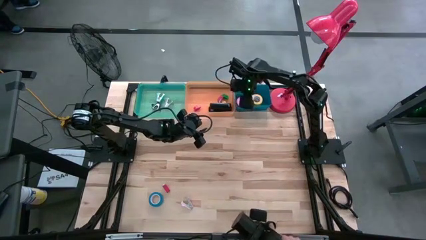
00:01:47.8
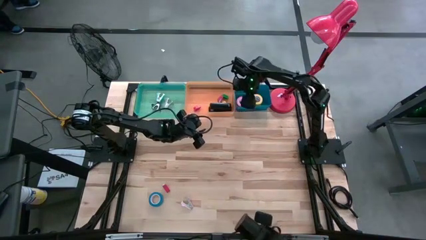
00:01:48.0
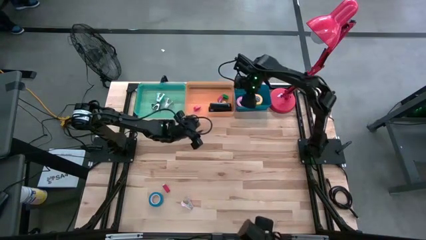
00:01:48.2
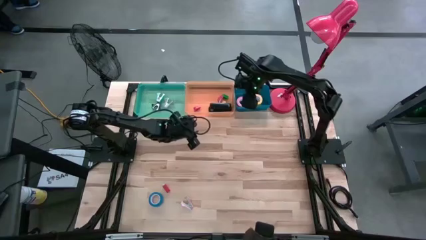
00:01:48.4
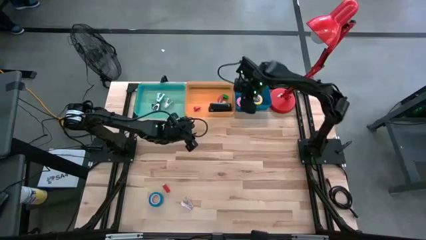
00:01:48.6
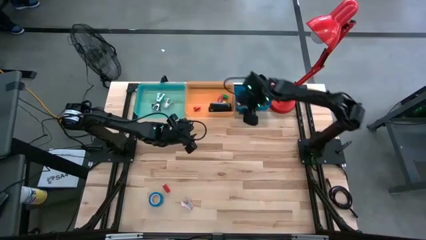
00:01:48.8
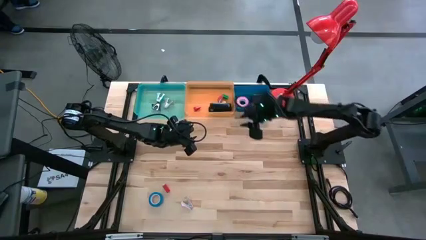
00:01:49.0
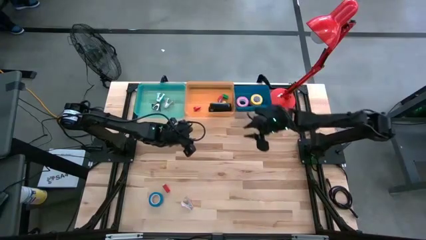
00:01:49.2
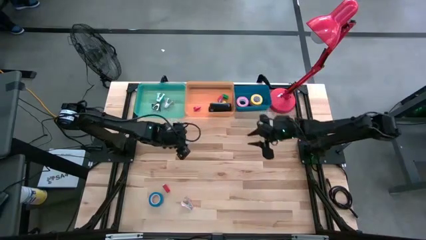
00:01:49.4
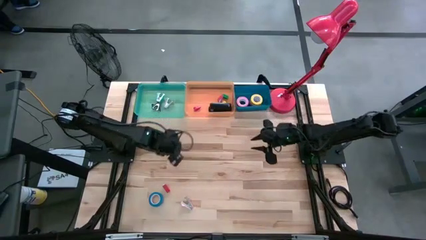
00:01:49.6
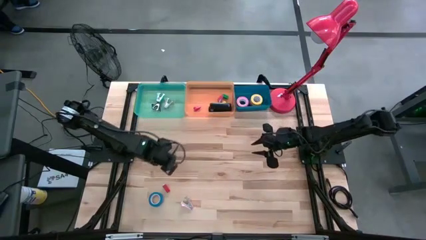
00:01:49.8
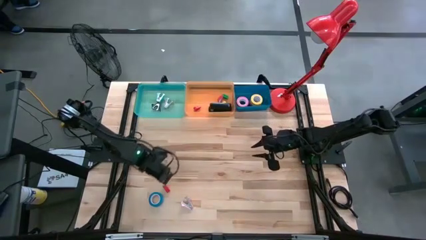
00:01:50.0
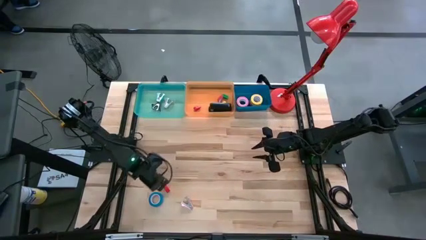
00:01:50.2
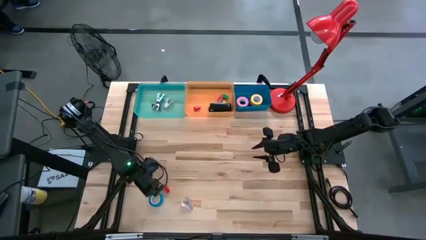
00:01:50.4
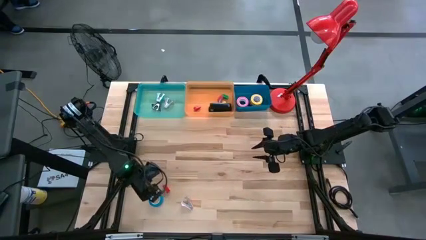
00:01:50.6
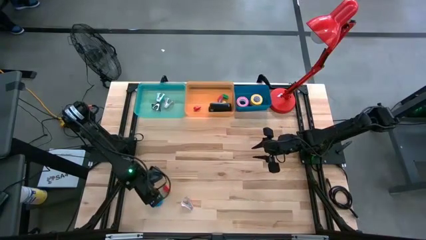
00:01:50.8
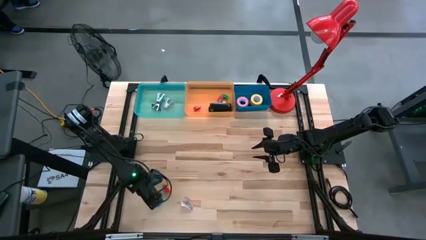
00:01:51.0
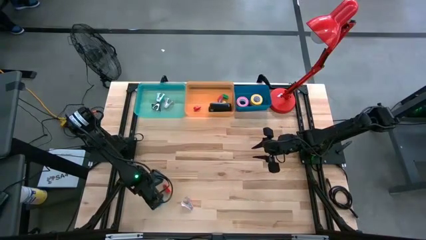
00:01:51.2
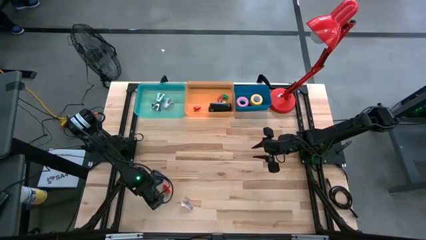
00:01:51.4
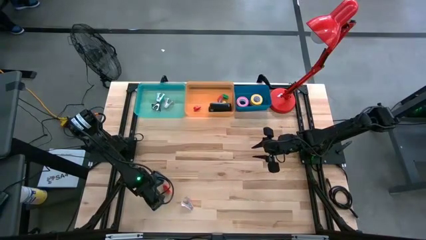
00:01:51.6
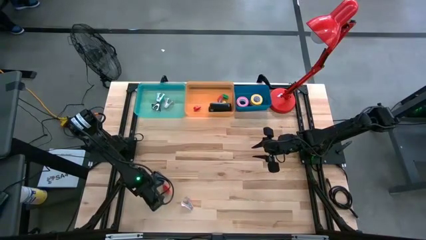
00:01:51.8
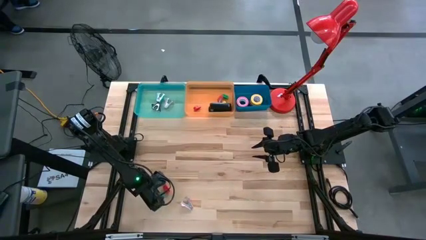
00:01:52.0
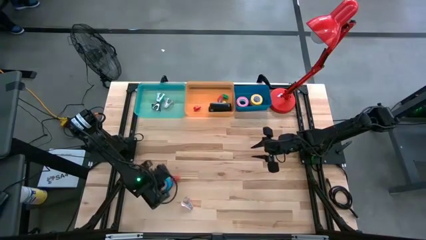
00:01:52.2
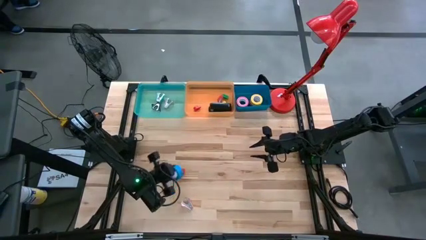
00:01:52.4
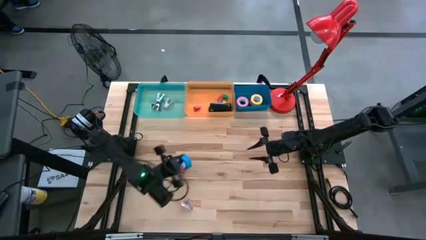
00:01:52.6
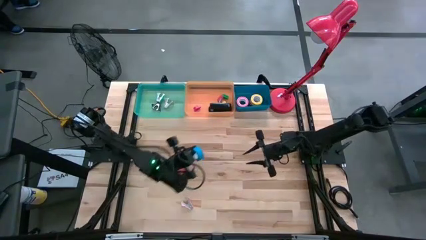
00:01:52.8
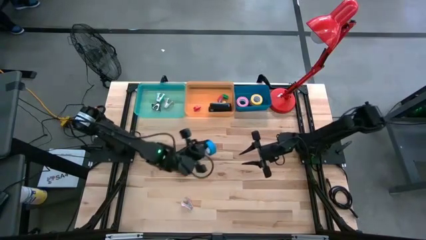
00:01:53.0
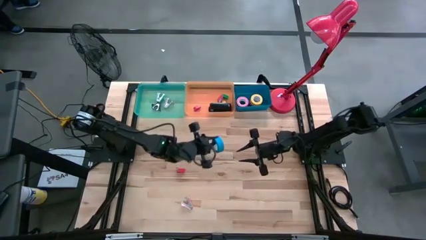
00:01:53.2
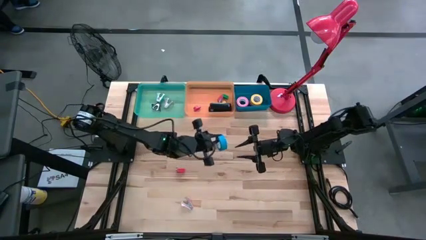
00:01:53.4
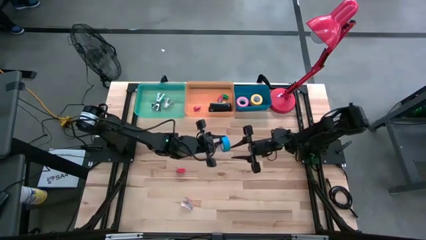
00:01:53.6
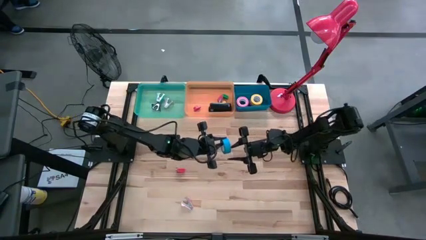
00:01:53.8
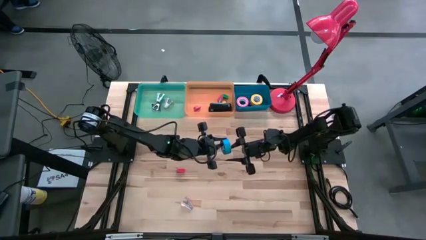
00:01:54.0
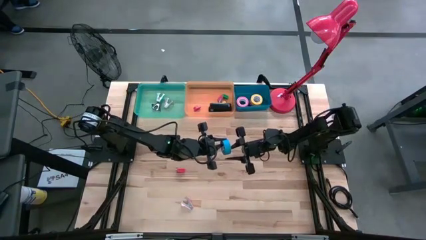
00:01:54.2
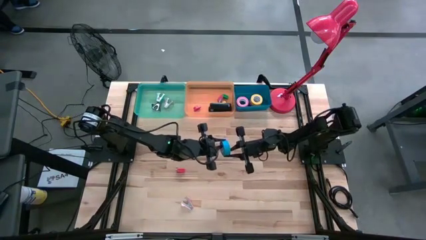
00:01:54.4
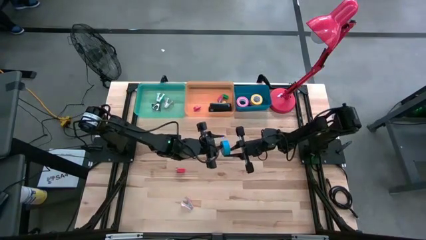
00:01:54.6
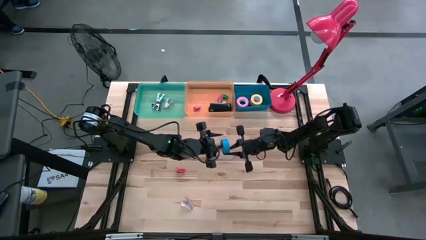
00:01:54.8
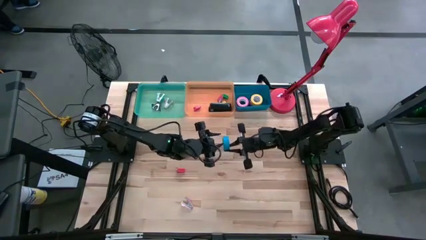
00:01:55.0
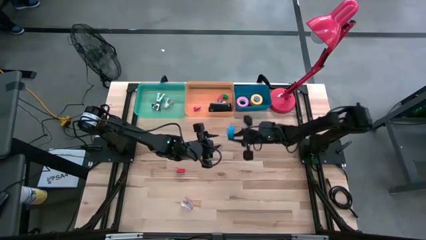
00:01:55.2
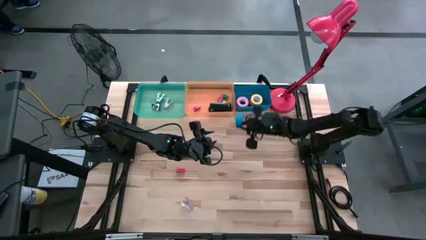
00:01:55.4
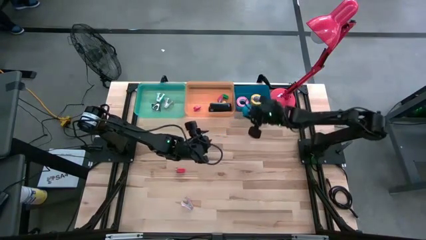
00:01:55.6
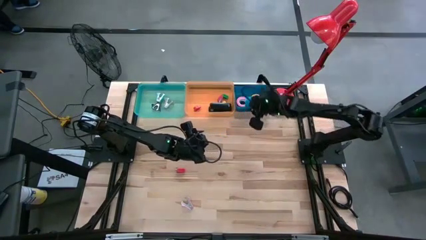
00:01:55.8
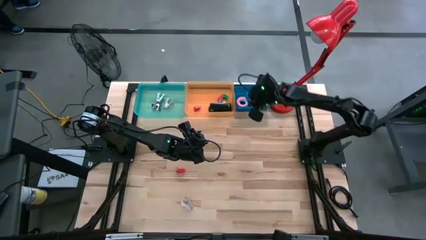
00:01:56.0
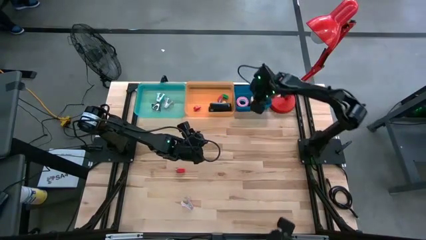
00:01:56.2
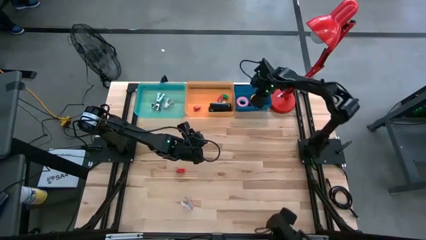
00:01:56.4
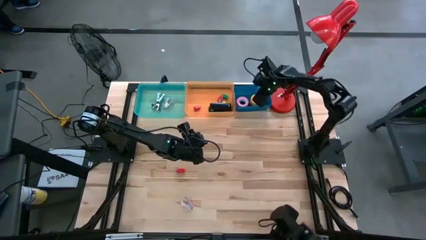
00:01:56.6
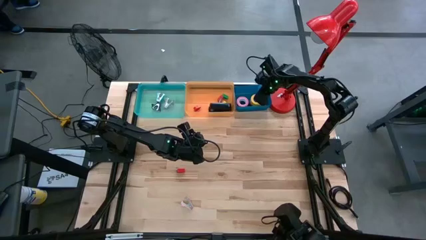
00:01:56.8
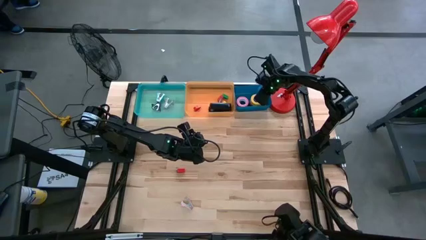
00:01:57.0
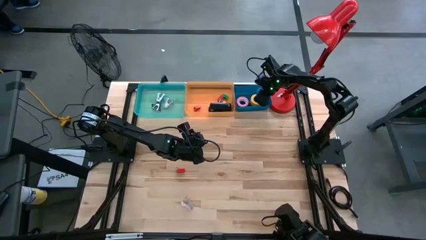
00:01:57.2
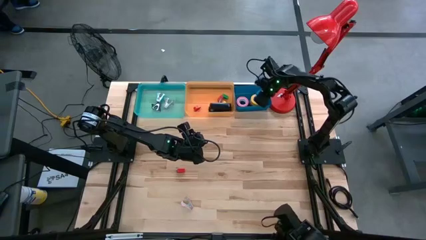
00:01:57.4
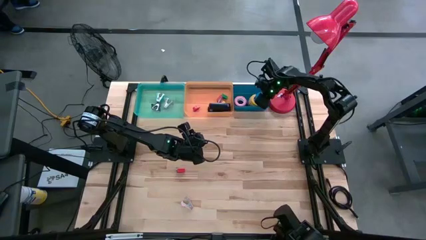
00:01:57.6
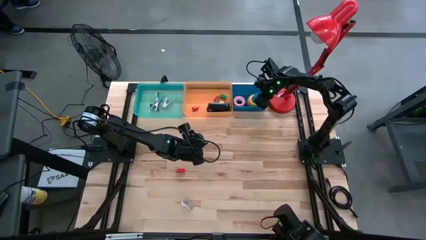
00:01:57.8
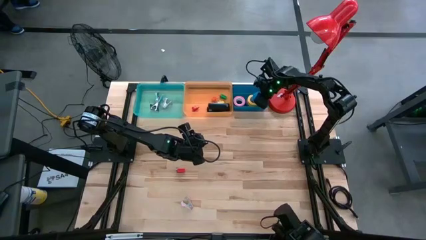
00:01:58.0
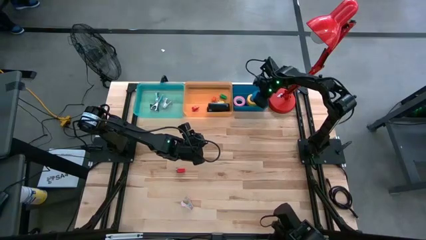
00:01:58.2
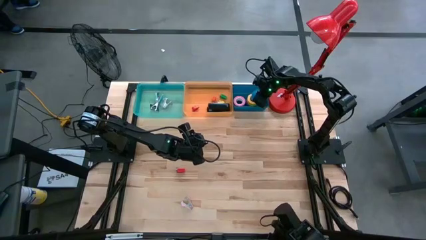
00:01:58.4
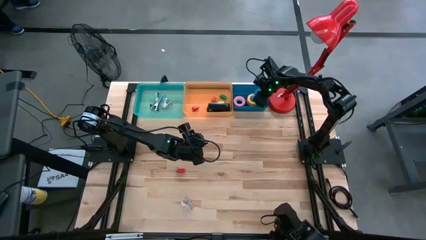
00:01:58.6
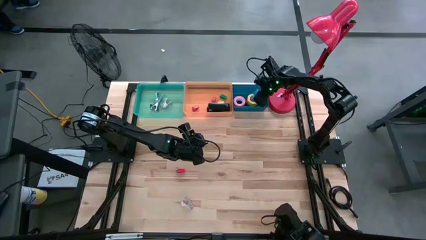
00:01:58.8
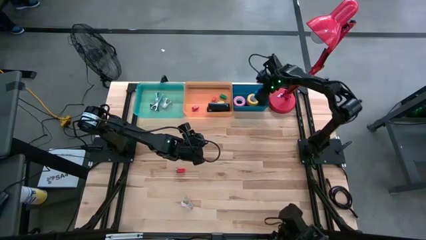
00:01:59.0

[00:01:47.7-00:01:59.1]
Task: Pick and place Stapler, Stapler remover, tape
Put the blue tape into the blue bin

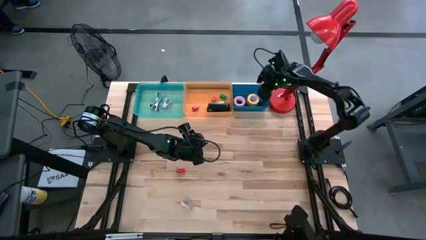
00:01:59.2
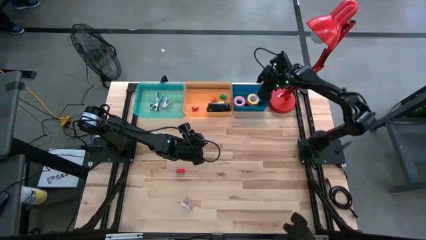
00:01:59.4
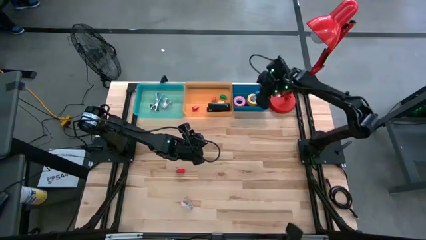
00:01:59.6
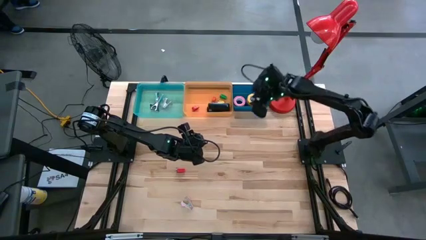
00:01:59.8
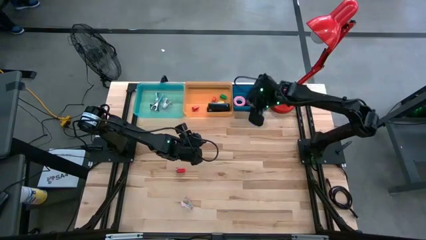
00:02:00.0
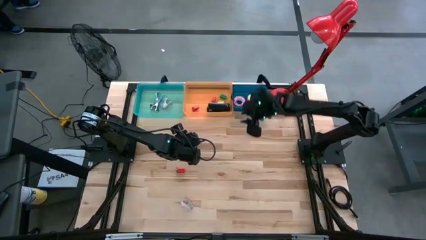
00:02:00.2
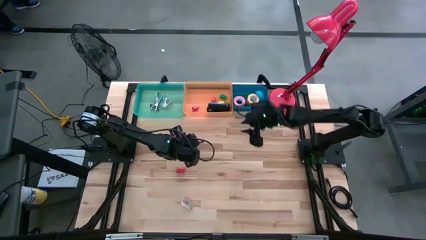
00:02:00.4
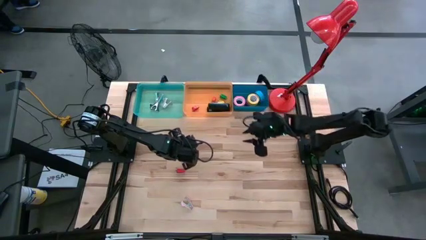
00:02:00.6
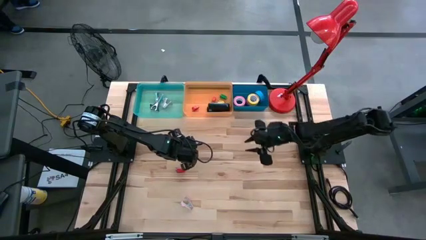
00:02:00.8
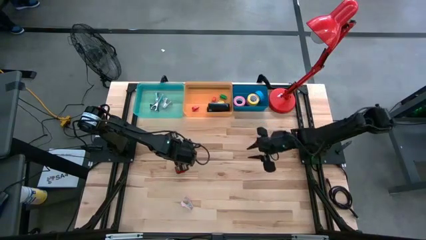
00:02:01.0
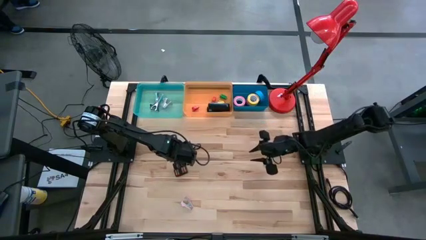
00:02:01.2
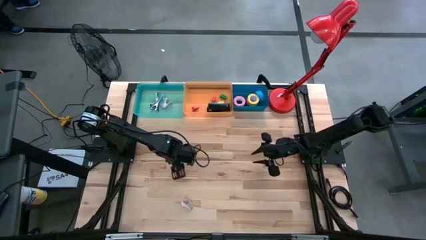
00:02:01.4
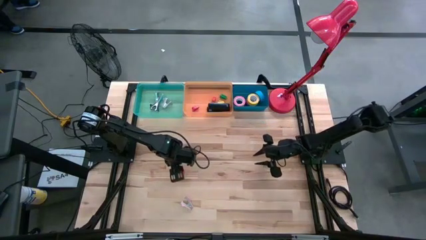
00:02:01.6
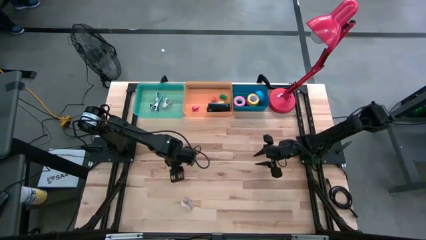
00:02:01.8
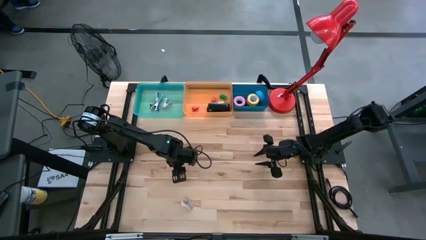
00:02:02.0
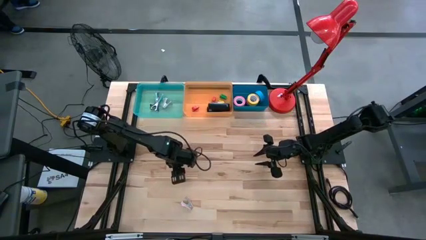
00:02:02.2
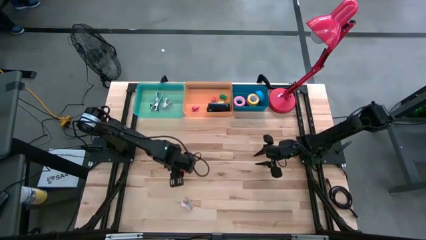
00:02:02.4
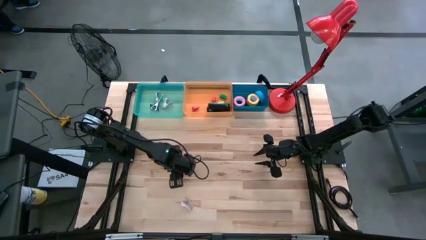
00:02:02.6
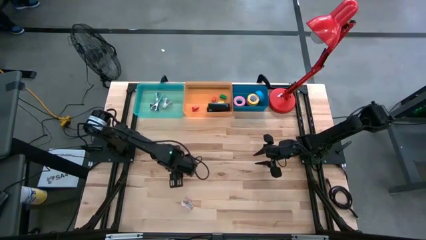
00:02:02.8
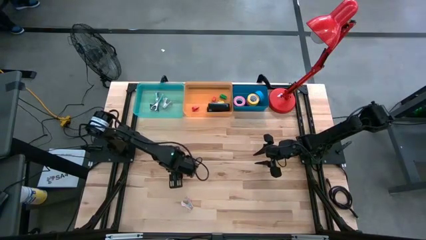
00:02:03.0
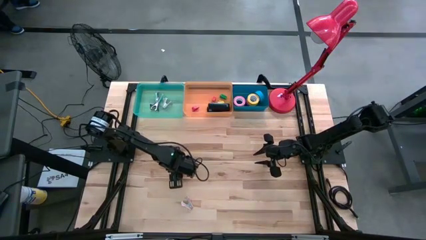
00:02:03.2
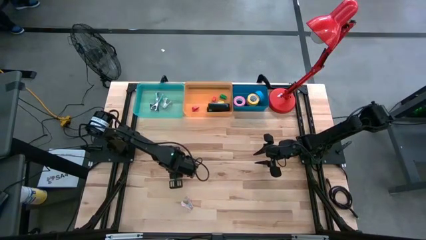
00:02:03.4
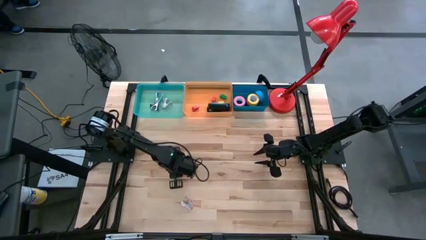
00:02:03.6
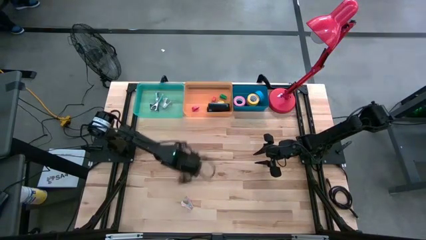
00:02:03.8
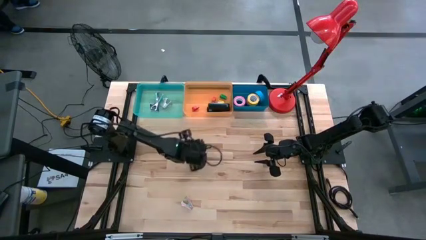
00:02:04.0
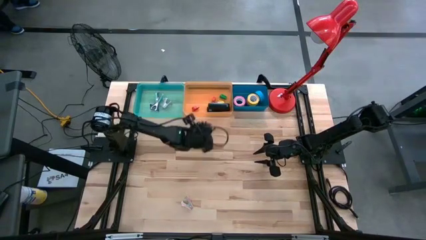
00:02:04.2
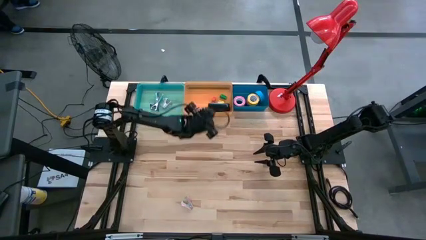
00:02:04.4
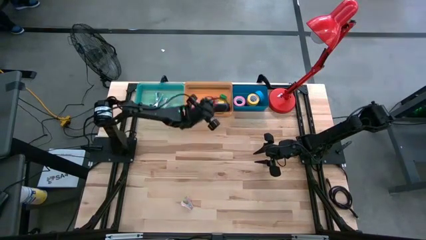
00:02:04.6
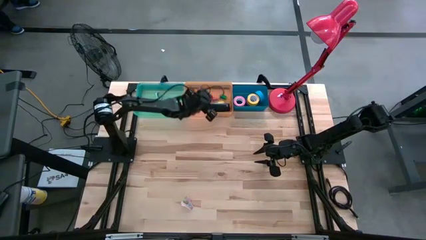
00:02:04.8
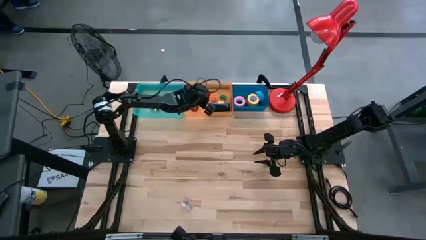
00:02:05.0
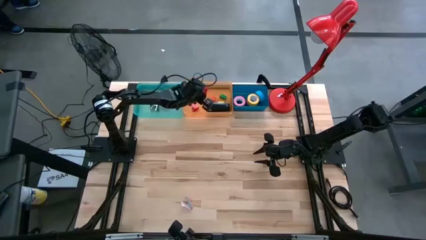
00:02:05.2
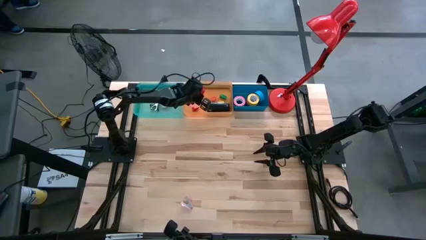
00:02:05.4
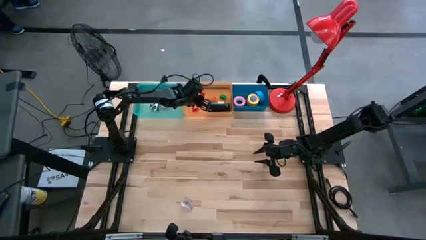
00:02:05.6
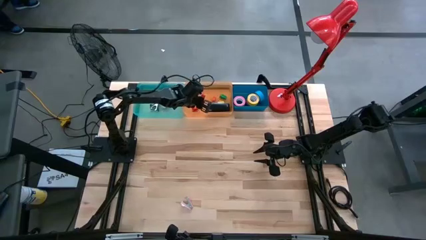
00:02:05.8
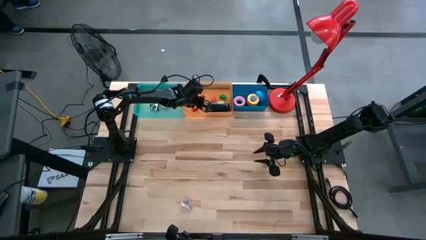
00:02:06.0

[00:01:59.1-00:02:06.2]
Put the red stapler into the orange bin
